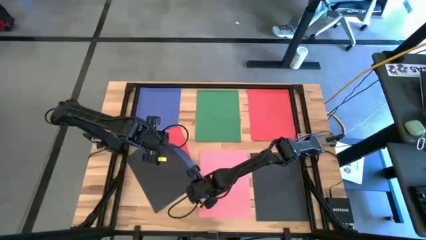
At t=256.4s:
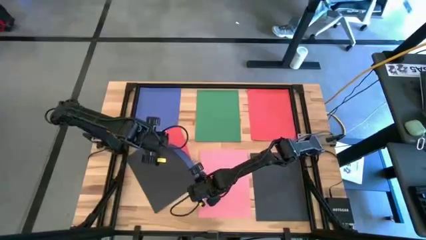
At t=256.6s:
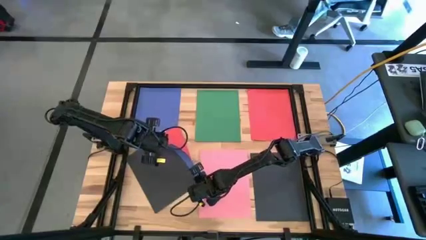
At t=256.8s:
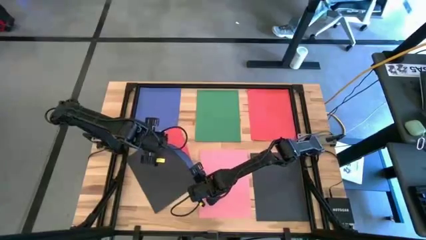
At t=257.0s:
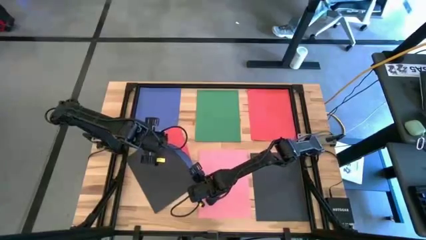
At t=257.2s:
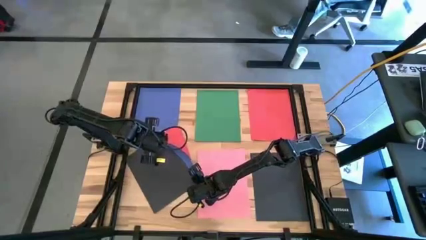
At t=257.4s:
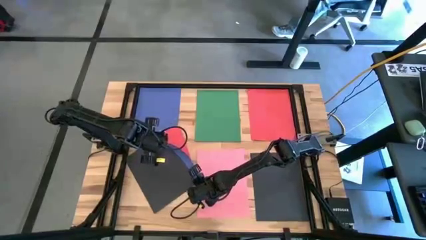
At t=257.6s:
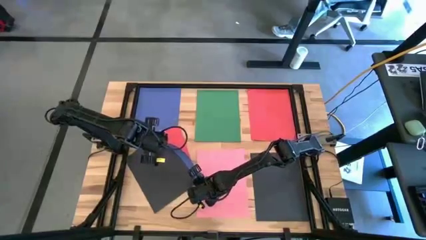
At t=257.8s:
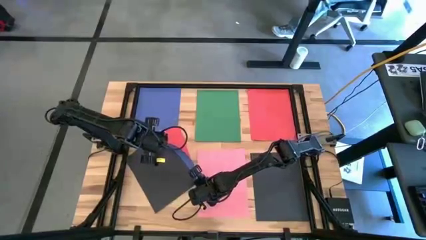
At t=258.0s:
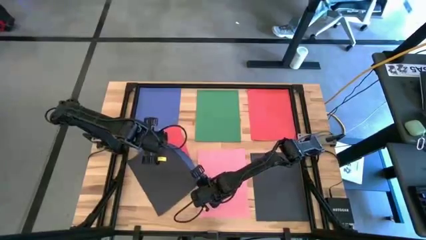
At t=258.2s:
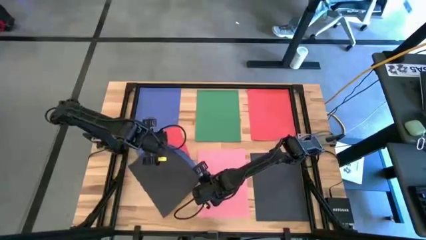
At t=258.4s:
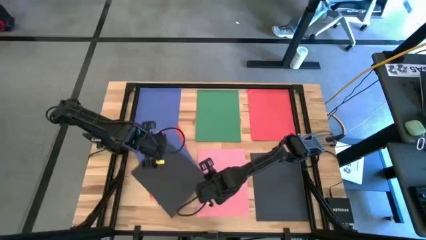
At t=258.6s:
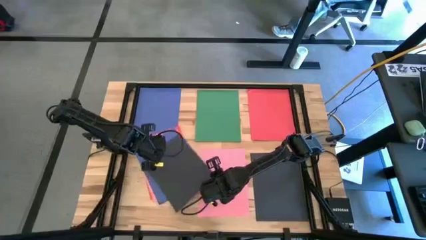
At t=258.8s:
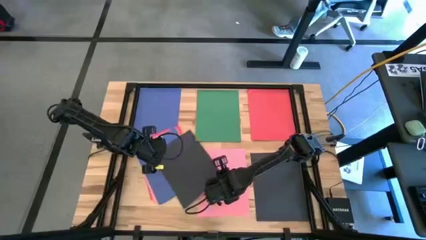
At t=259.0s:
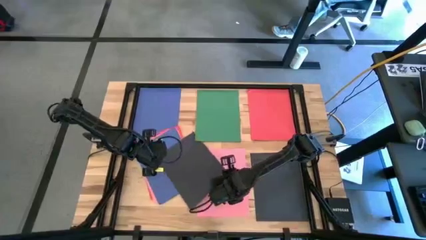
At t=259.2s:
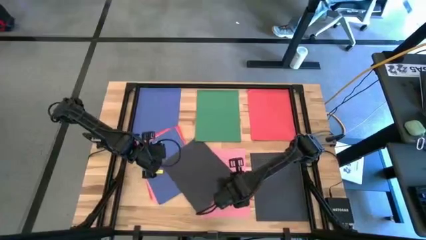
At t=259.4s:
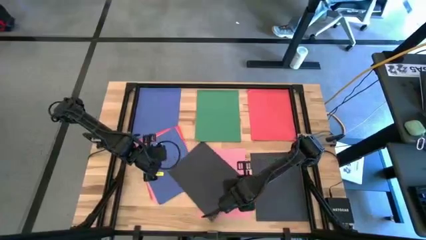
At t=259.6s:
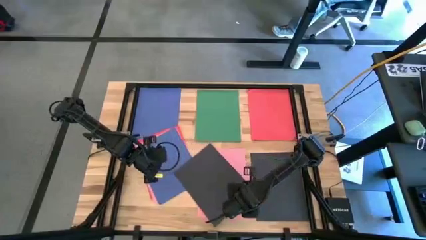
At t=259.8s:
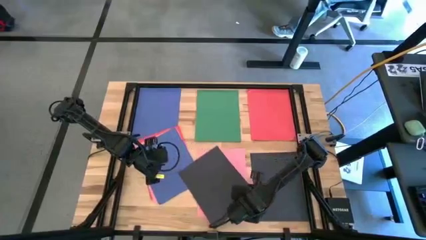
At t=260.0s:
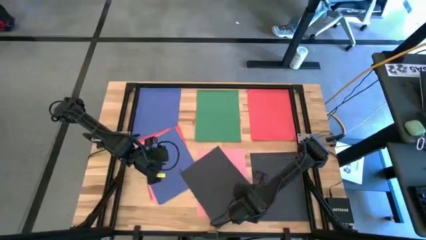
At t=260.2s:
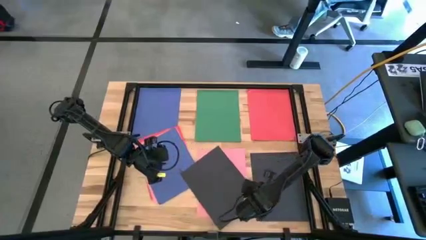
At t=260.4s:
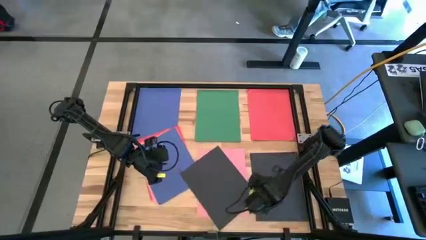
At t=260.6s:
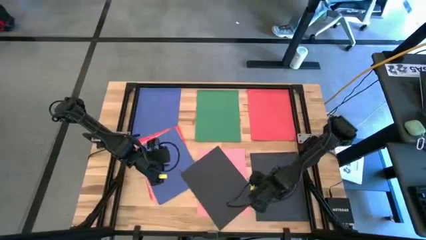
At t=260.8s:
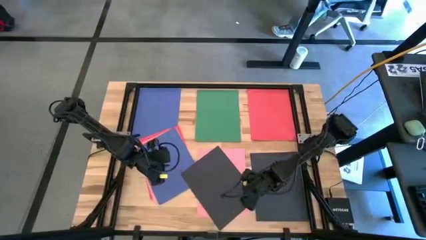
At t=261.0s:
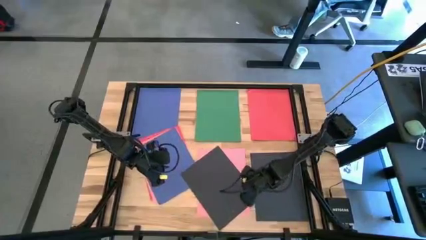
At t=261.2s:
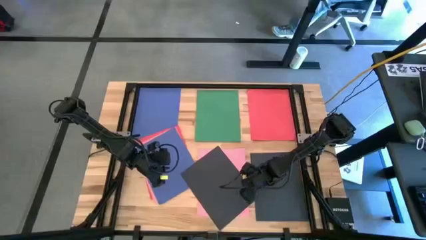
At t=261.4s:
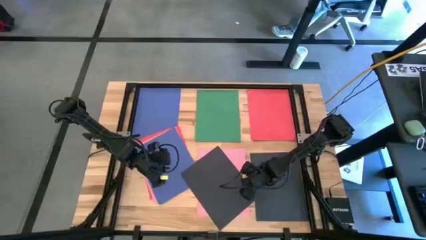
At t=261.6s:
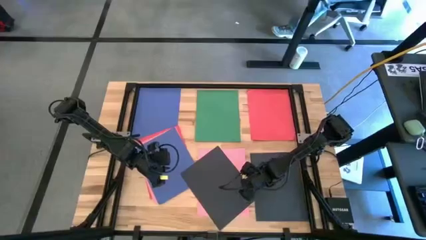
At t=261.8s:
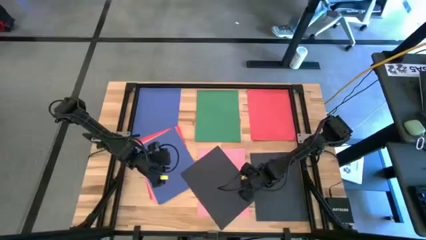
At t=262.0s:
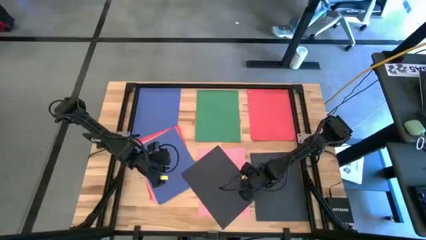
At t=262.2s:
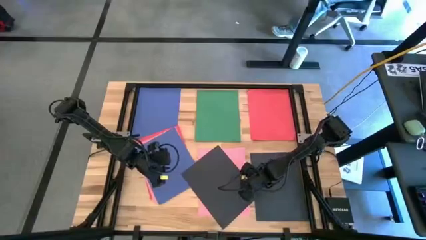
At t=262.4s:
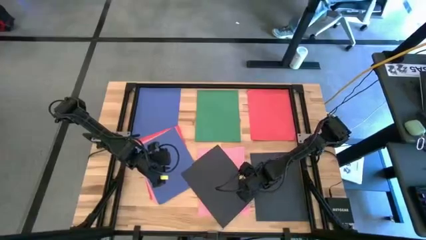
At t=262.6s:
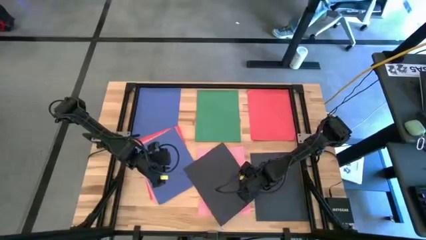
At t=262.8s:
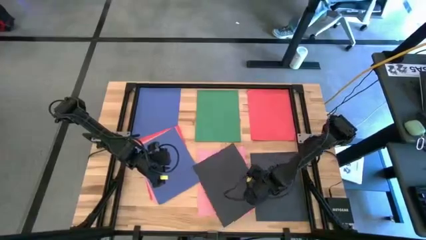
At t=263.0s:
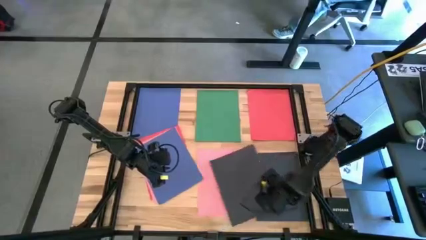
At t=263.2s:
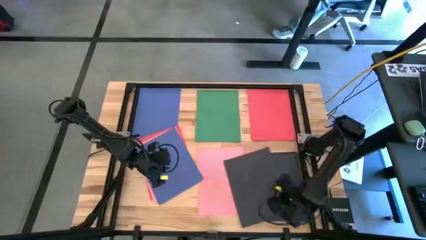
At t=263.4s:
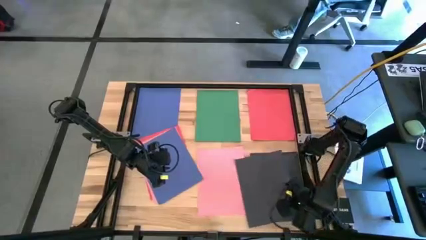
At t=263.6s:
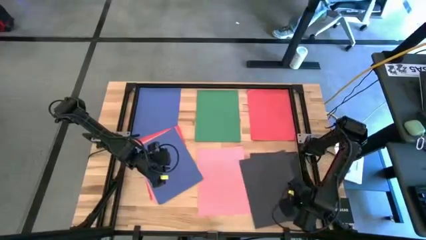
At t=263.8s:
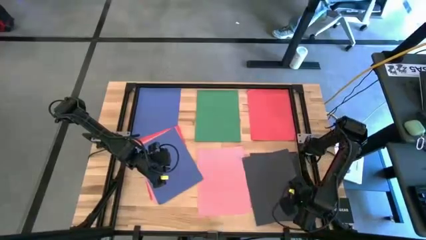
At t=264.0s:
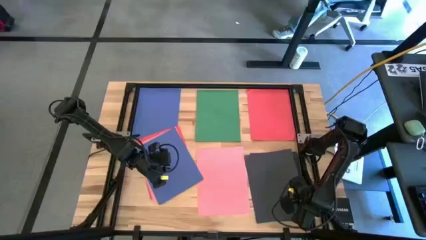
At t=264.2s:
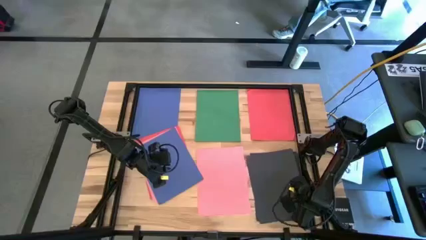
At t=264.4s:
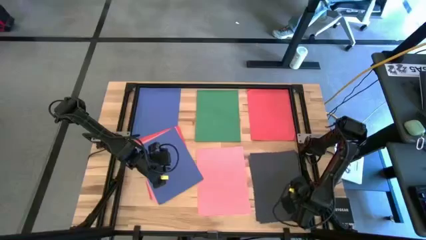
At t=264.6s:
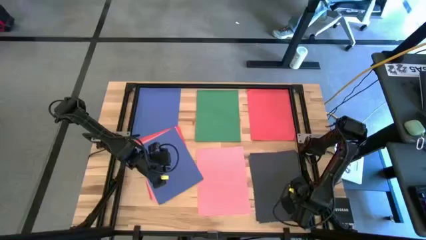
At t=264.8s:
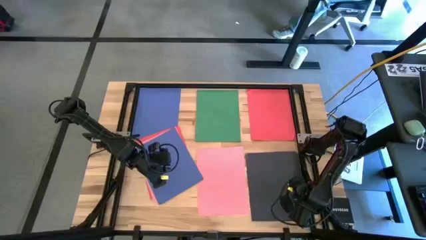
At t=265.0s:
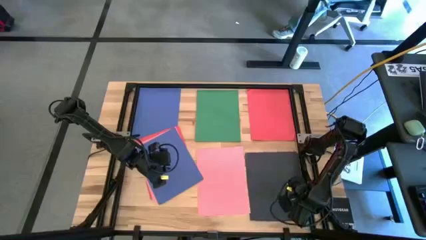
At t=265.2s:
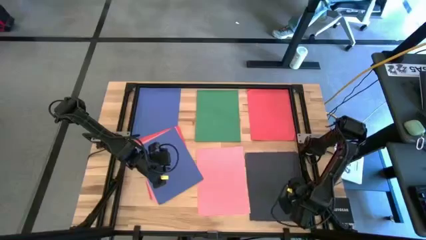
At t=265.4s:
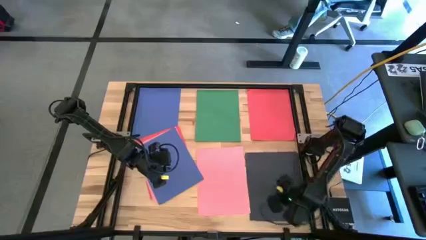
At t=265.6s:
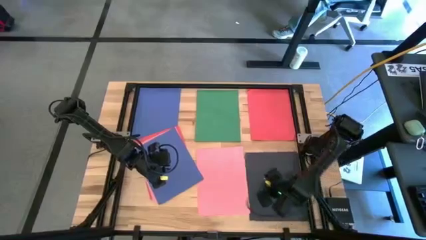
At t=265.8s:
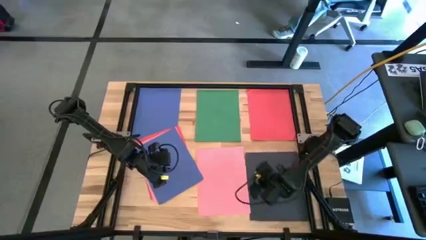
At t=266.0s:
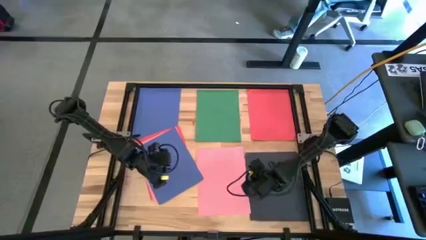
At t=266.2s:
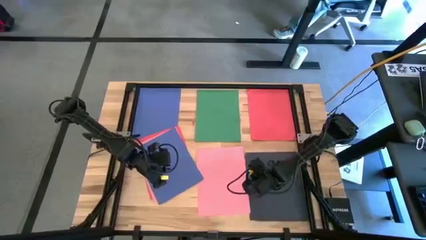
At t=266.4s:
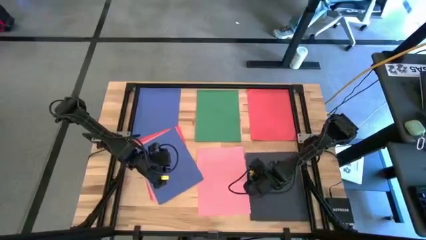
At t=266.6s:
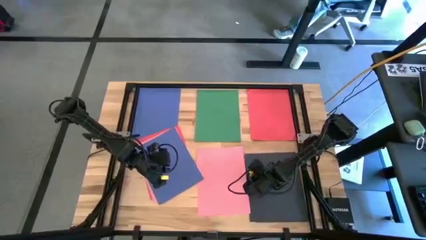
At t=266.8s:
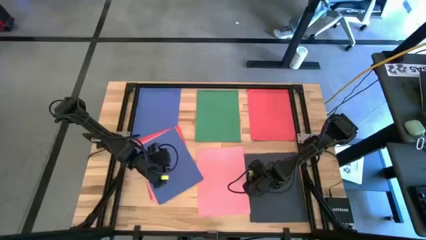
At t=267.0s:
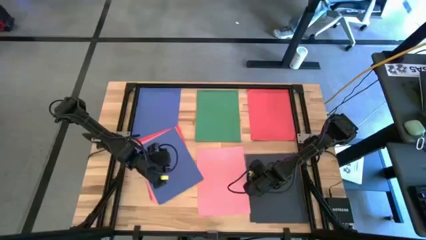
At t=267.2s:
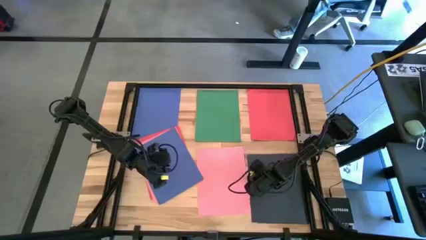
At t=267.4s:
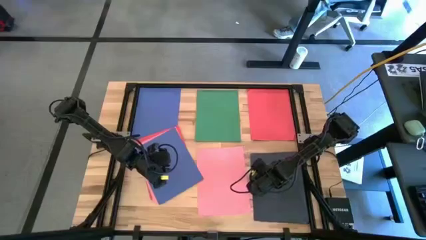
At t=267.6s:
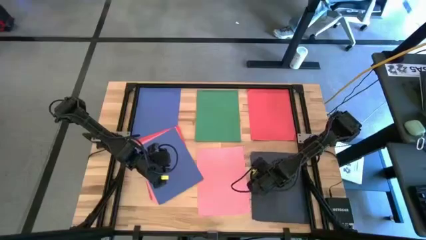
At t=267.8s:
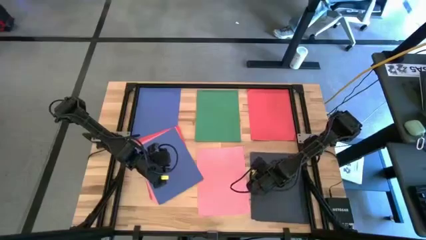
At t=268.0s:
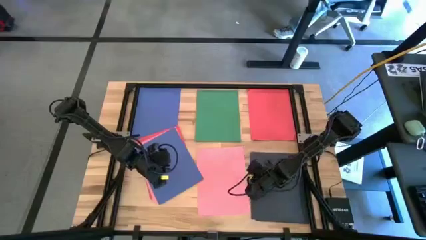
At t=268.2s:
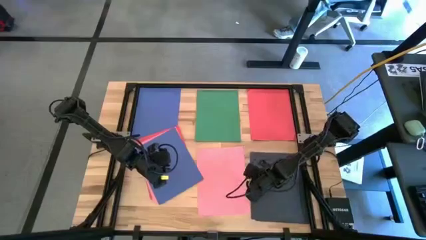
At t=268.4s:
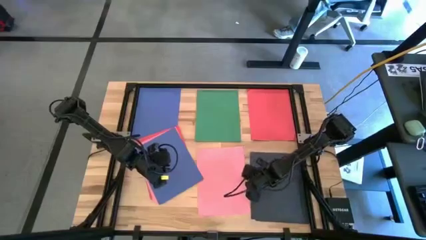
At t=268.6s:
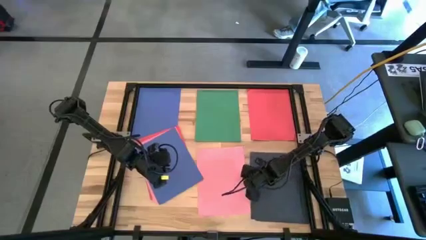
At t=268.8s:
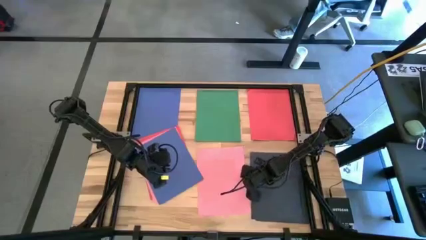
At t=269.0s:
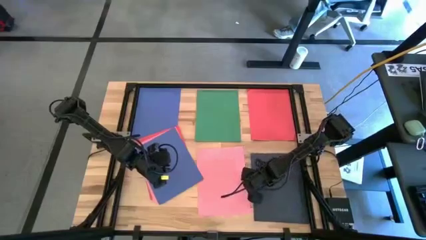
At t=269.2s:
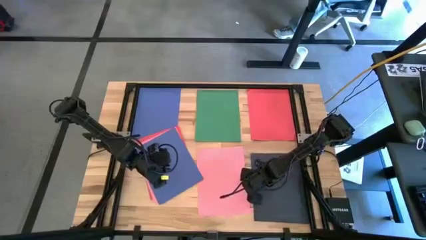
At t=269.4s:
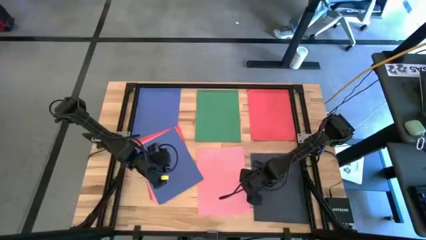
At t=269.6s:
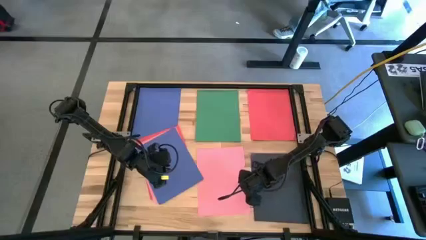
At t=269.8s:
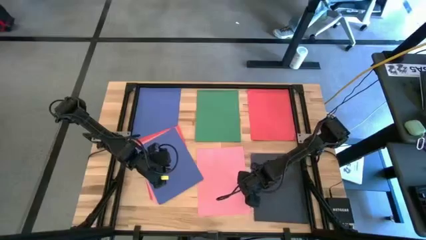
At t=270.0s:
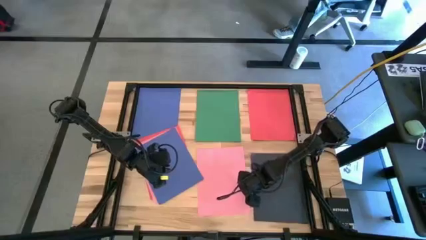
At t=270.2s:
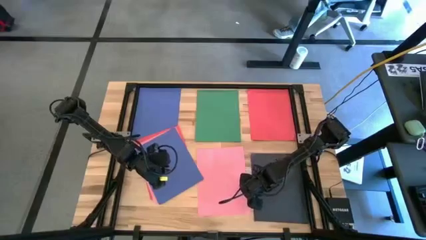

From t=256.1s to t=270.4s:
Task: Organize paper
Stack the black paper on top of the other black paper

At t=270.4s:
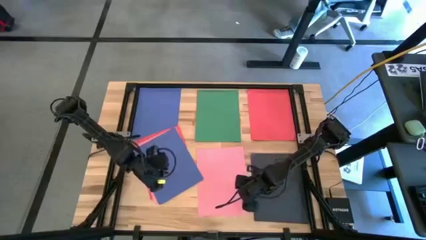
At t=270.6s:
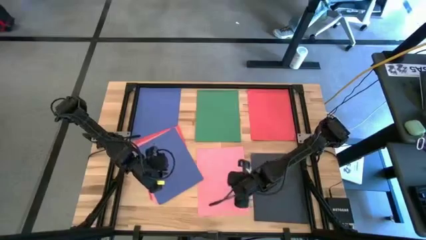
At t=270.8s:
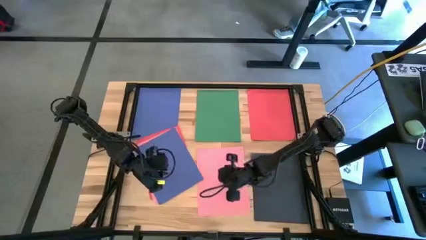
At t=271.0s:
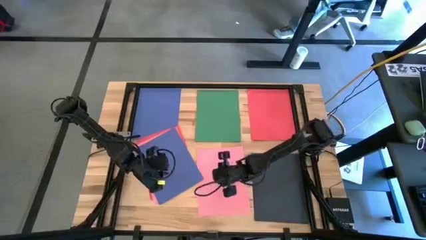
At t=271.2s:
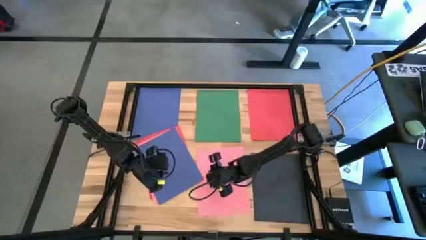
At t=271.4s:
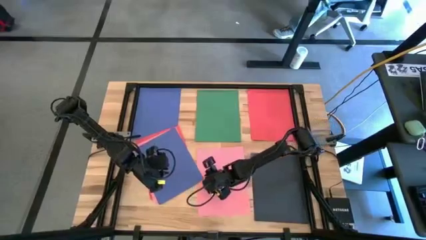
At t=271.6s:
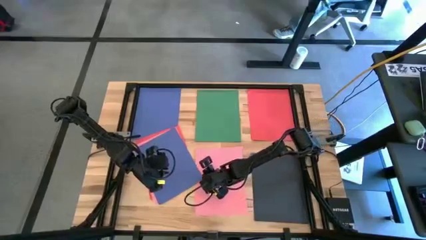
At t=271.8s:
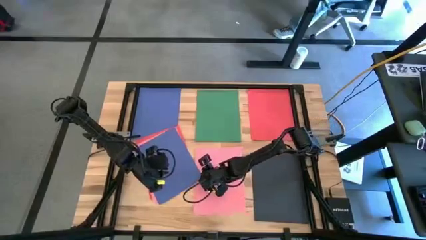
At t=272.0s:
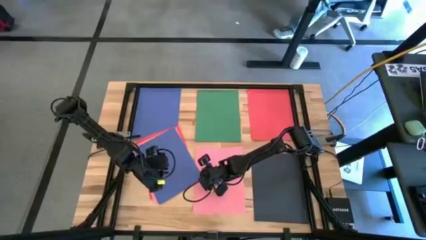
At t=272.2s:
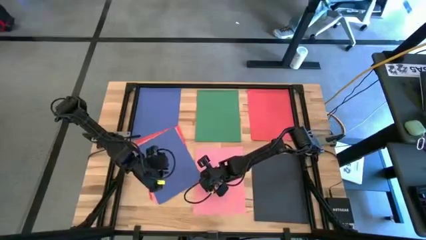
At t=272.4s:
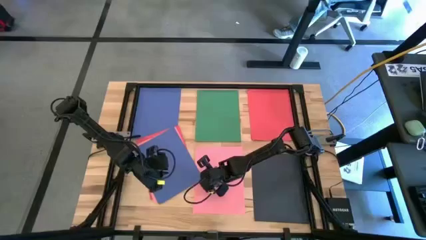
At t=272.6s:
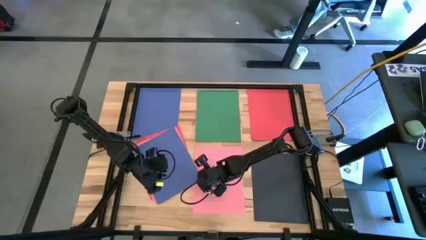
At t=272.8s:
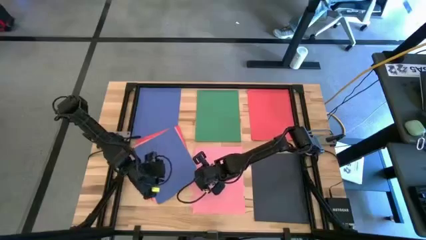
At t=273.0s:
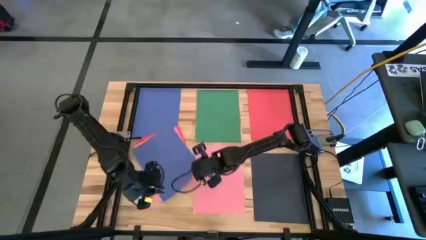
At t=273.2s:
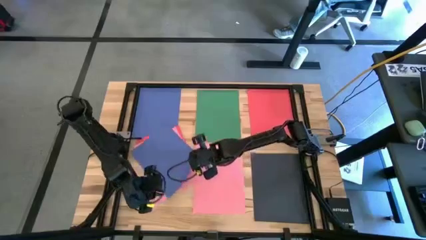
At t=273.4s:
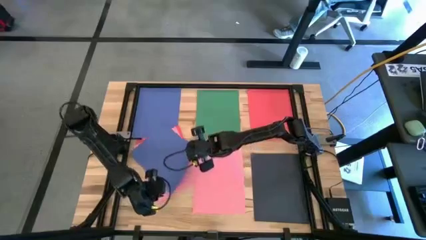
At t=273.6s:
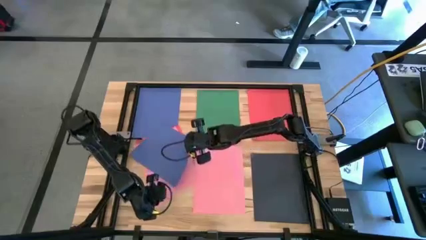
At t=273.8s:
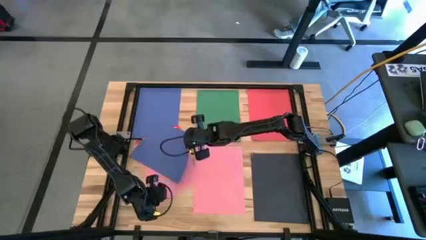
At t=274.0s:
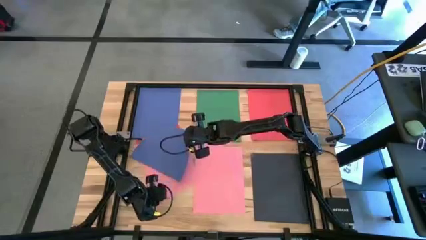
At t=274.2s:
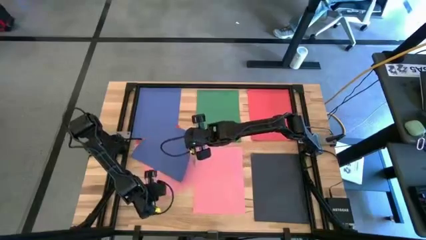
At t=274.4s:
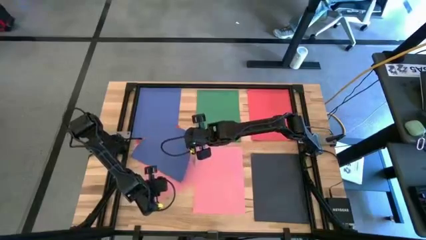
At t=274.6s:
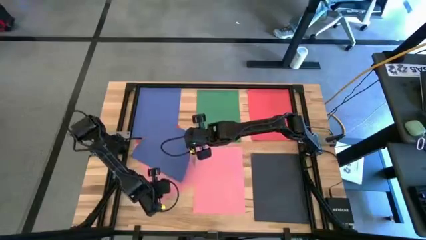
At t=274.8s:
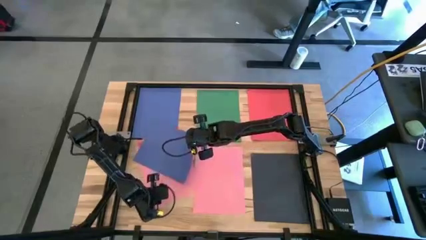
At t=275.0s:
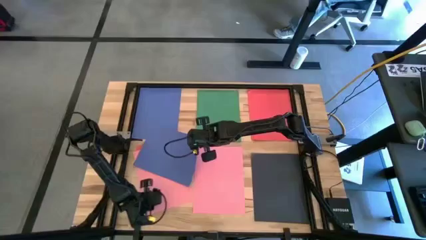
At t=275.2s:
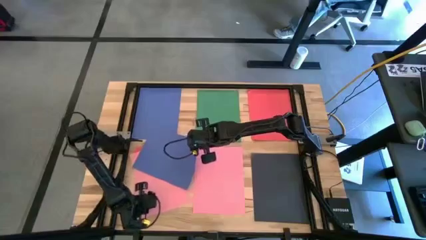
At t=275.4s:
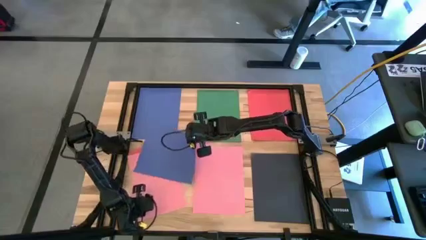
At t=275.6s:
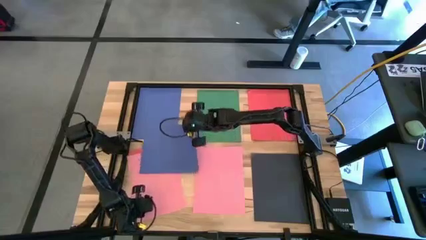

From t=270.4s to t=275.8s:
Stack the blue paper on top of the other blue paper
